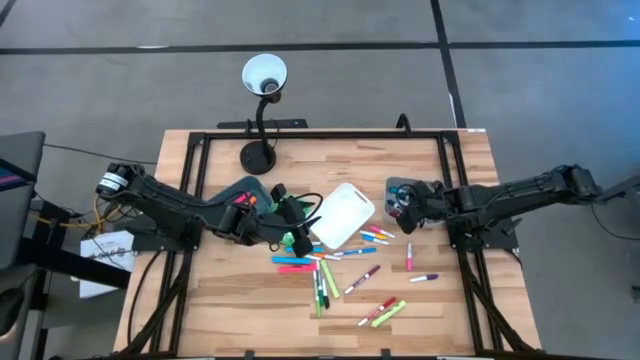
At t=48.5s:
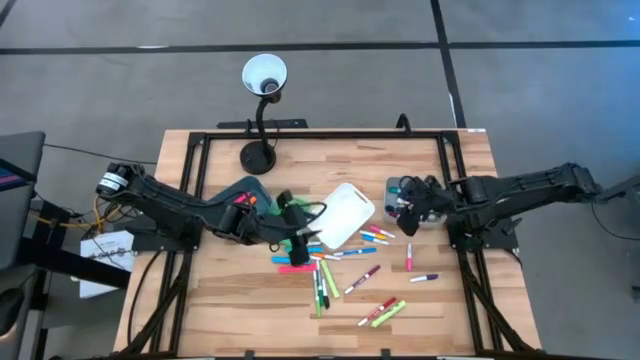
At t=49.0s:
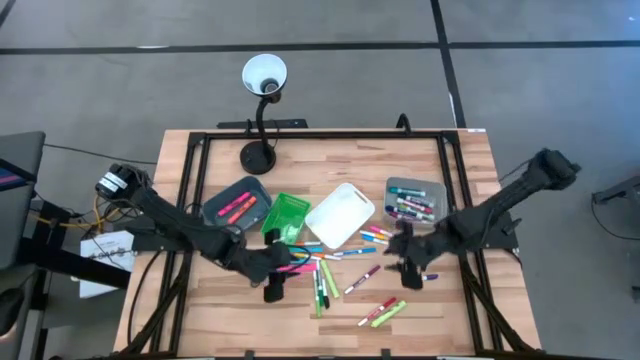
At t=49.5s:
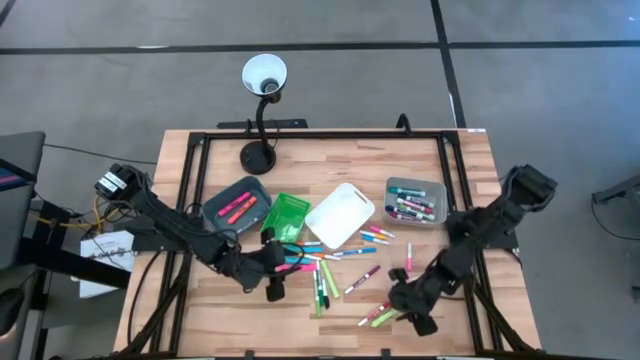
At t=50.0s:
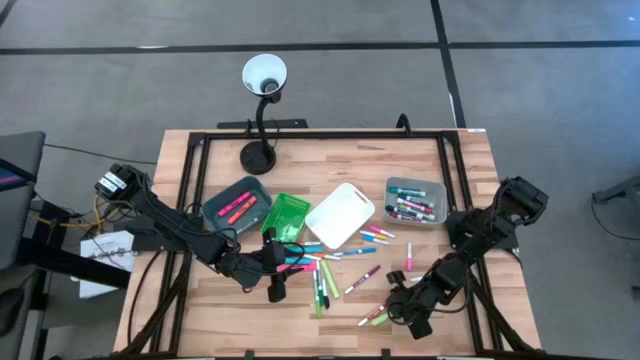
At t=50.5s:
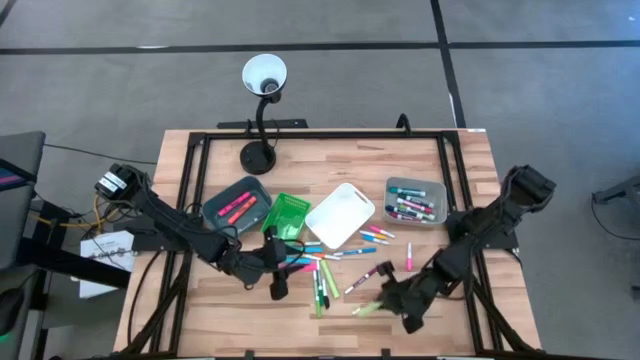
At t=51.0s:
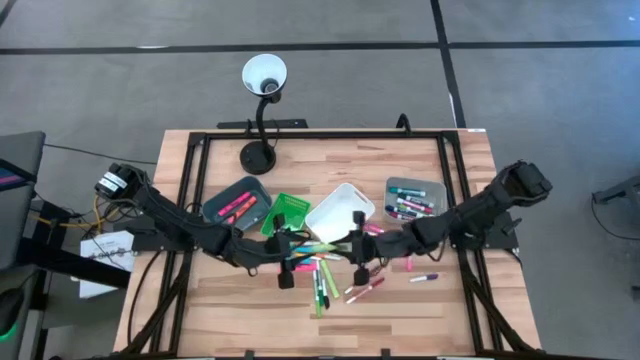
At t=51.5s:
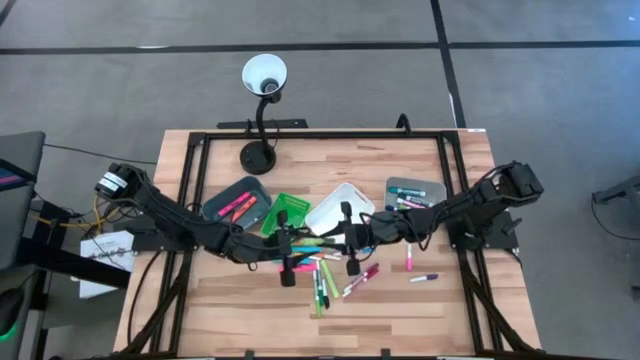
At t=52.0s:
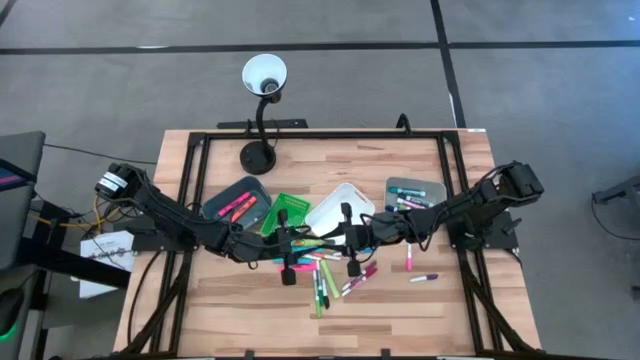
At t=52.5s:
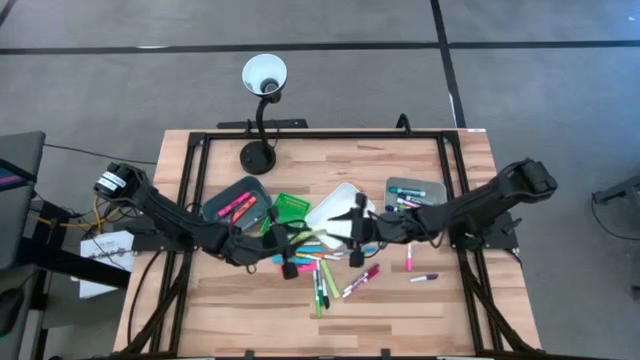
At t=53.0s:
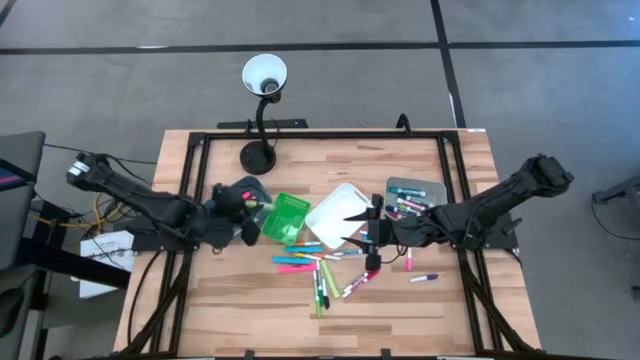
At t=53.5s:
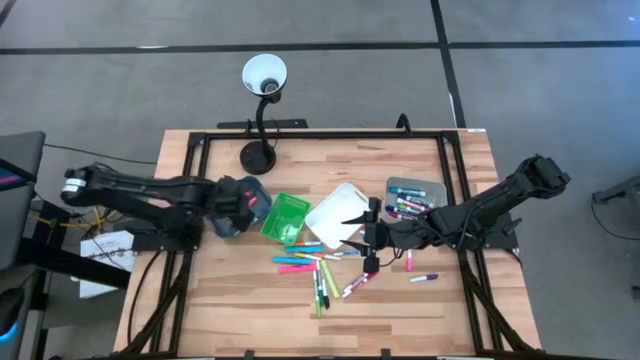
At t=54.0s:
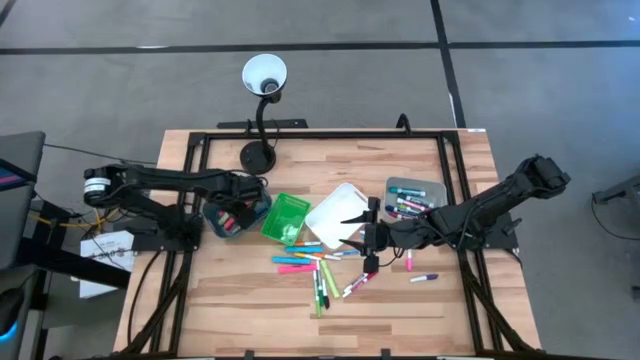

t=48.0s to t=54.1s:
Task: Pick & Place Markers
Put the green highlighter pen into the blue bin

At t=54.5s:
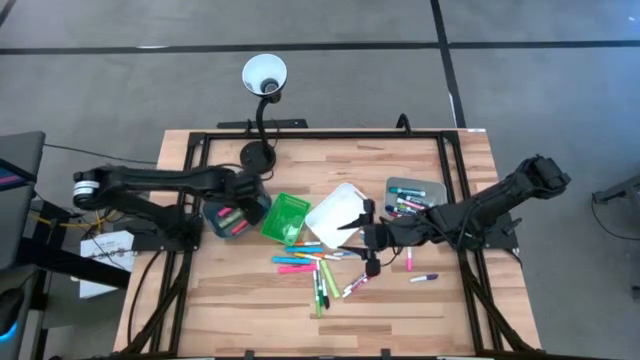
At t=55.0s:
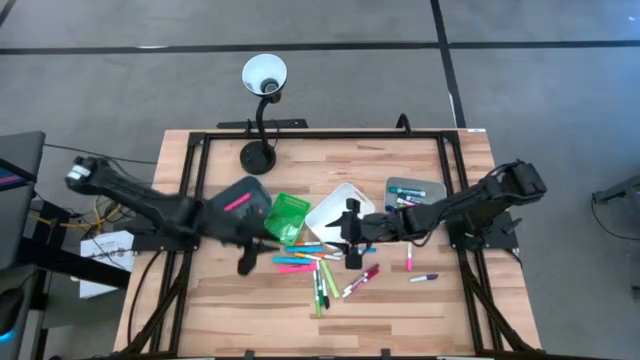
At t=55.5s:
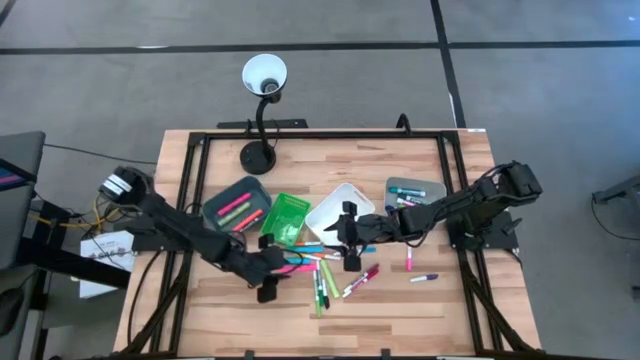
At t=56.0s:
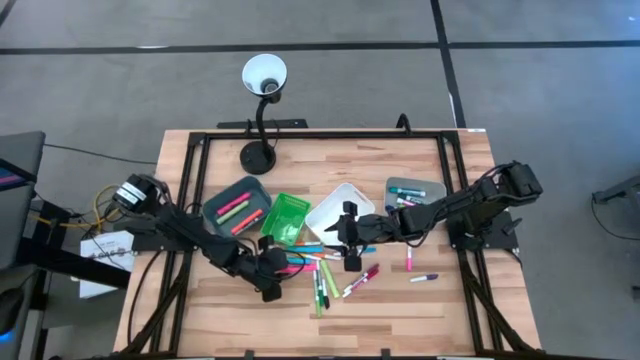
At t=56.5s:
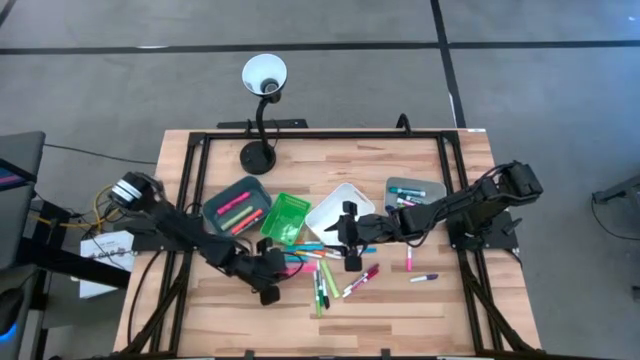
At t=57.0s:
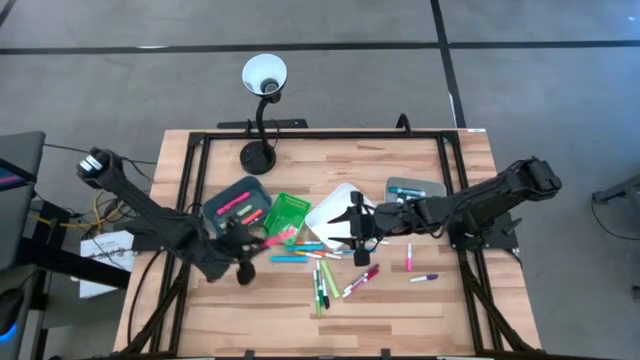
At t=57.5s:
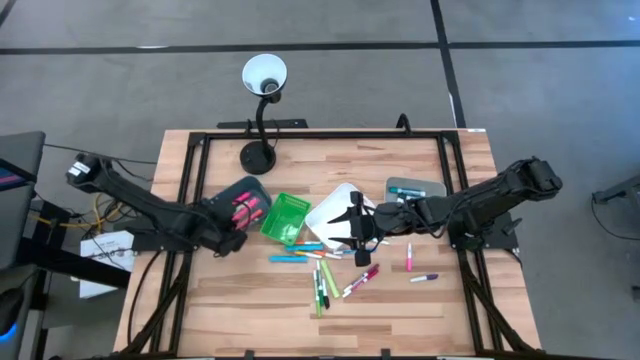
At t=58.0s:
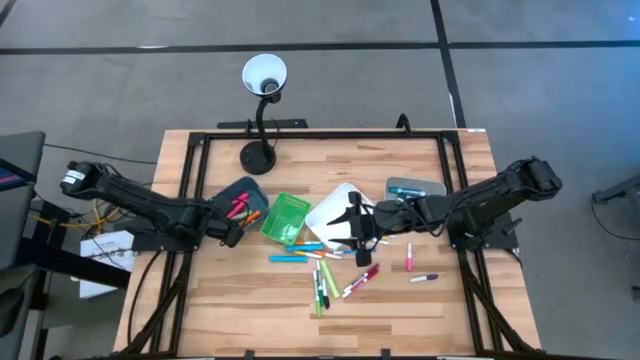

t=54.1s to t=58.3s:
Put the pink highlighter pen into the blue bin

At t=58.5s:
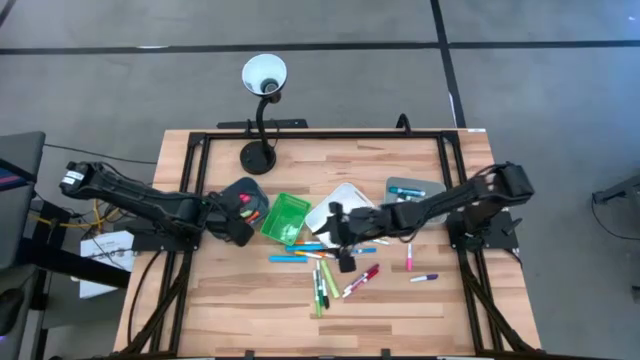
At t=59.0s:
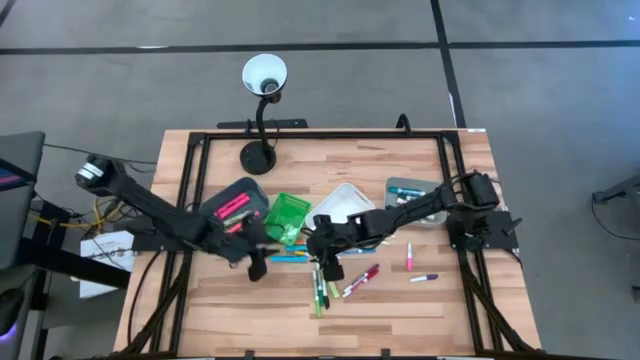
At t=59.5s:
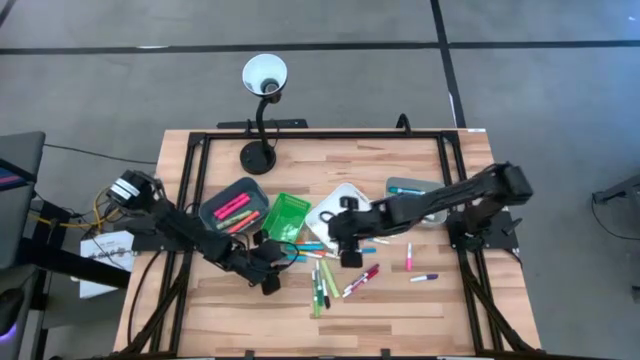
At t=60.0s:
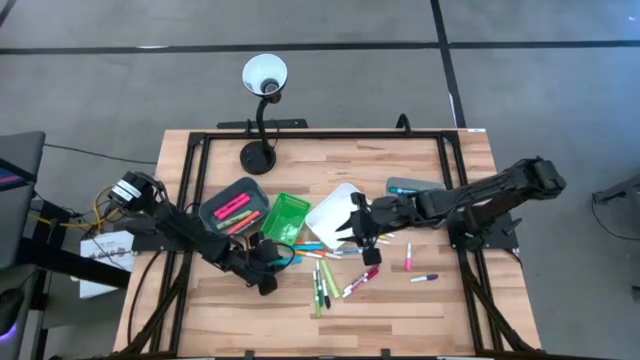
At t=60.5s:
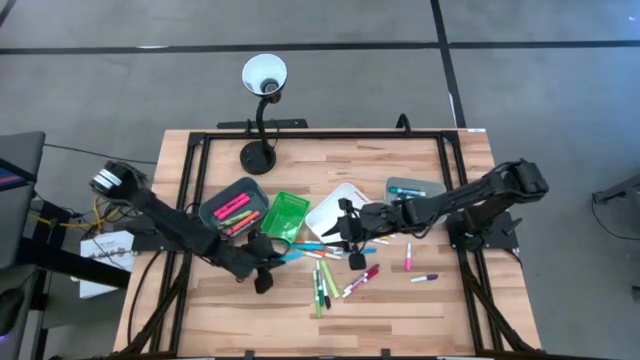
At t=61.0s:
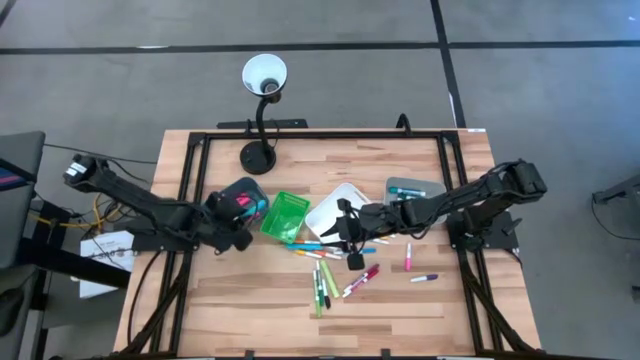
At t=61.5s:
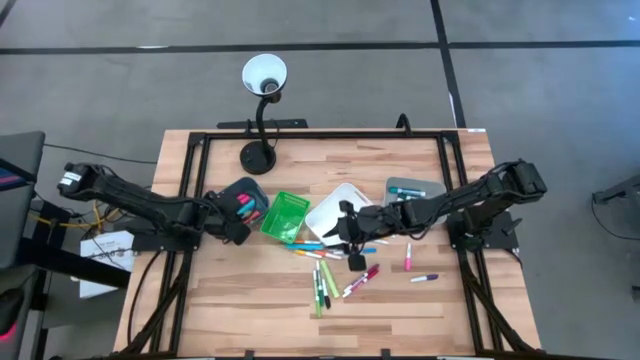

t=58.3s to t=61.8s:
Put the light blue highlighter pen into the blue bin

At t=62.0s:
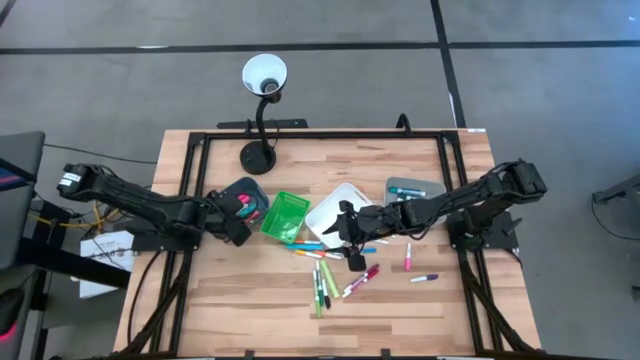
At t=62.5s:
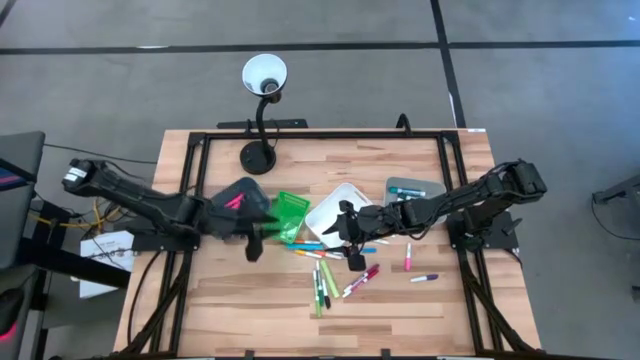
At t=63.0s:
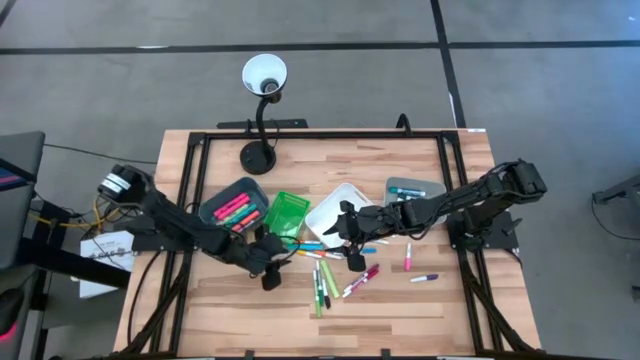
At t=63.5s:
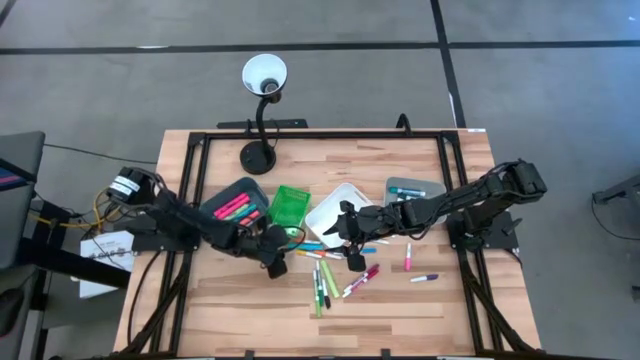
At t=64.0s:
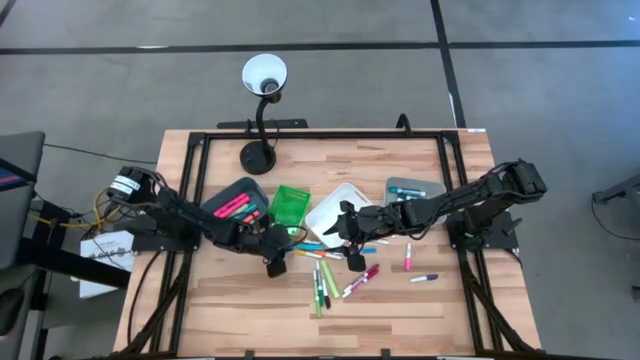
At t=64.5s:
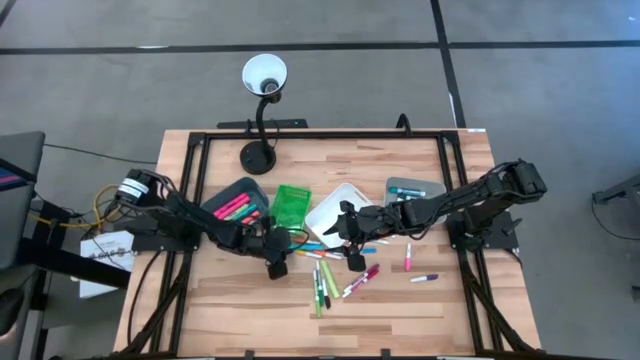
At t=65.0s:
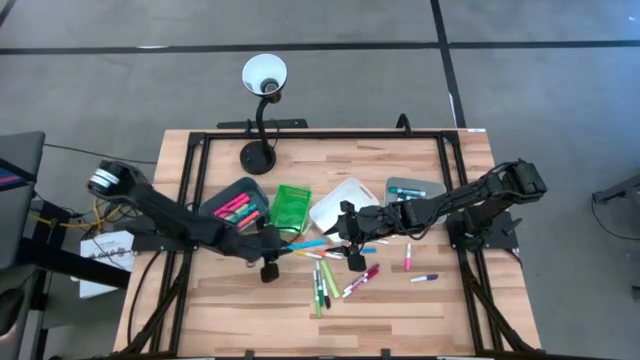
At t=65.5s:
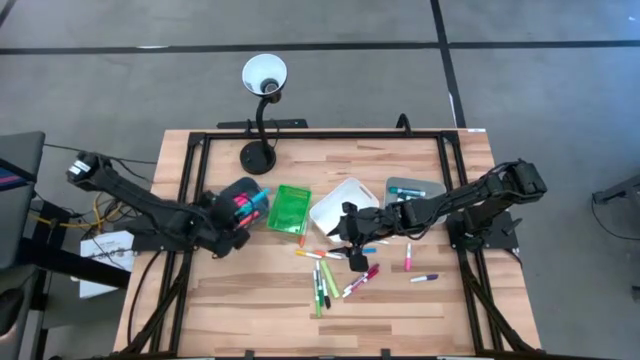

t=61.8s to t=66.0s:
Put the light blue highlighter pen into the blue bin

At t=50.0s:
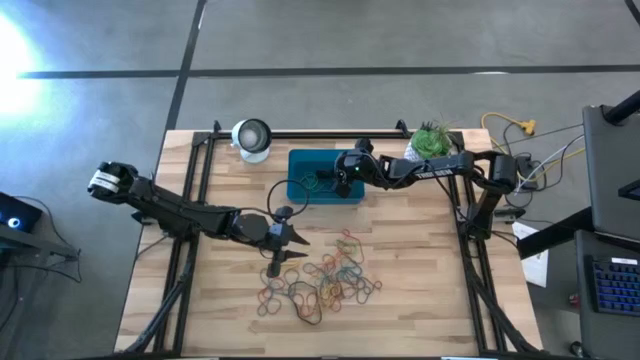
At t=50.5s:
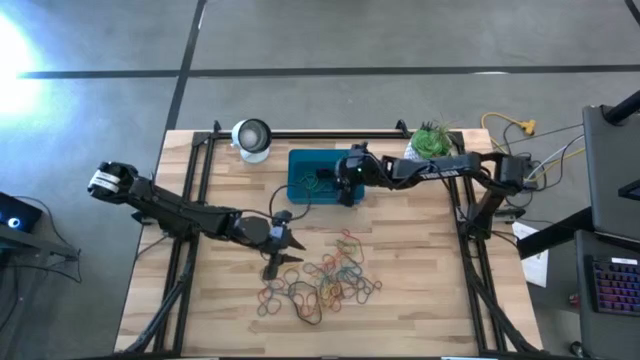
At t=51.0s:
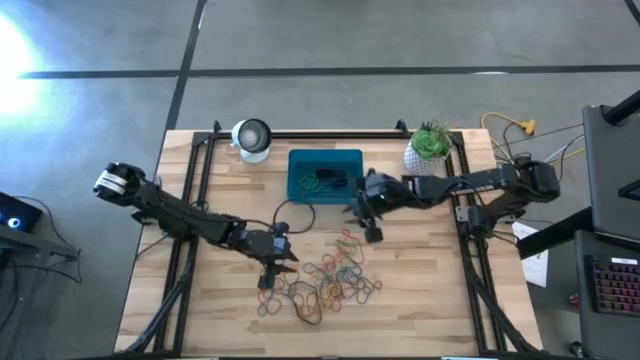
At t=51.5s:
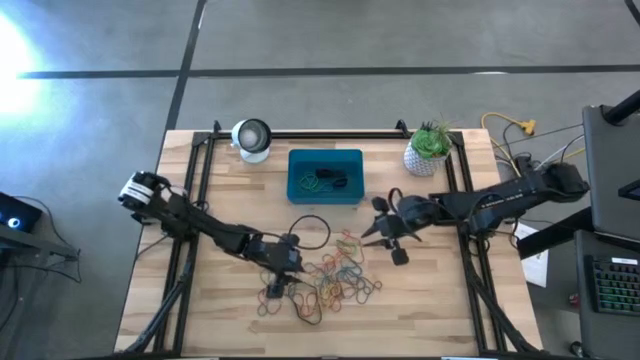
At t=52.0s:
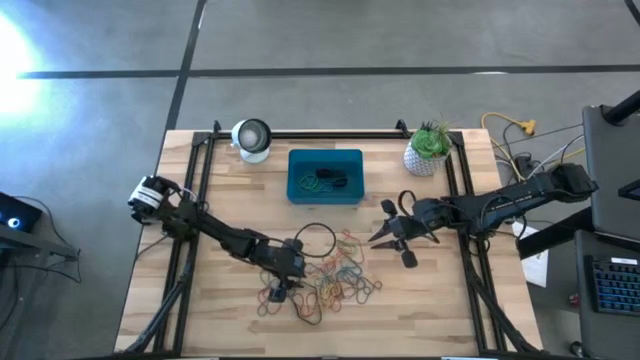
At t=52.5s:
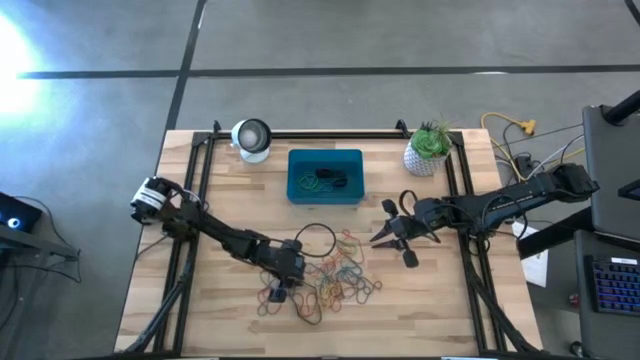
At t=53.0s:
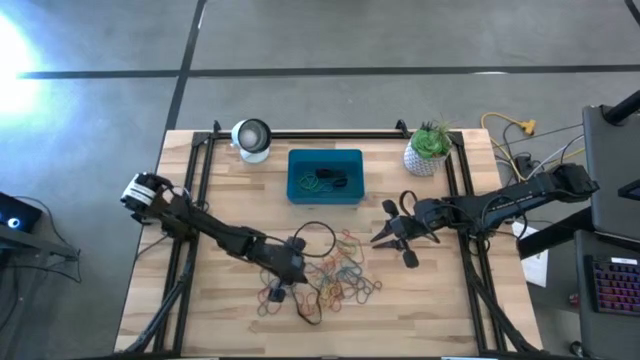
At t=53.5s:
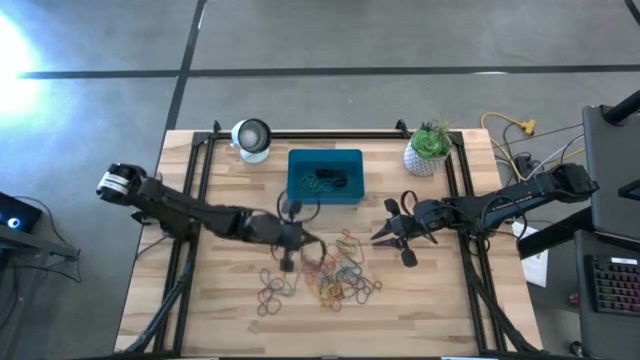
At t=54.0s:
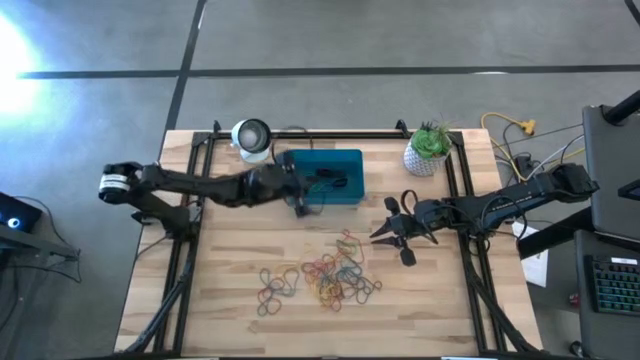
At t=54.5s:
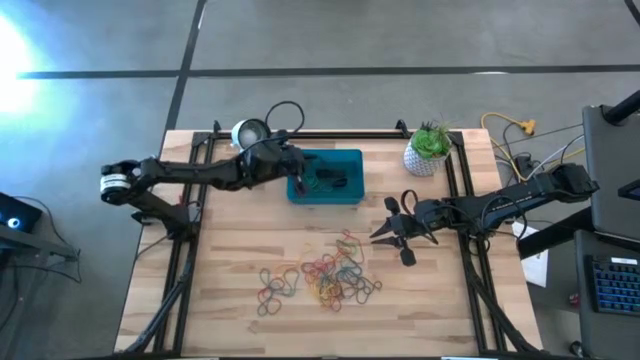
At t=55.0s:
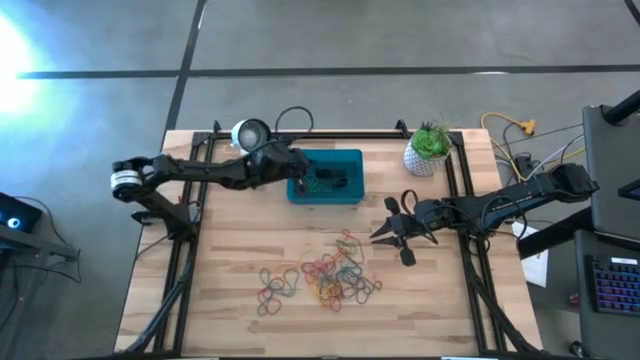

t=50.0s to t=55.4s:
Task: Pick and place rubber bands into bin
Put the black rubber band into the bin
